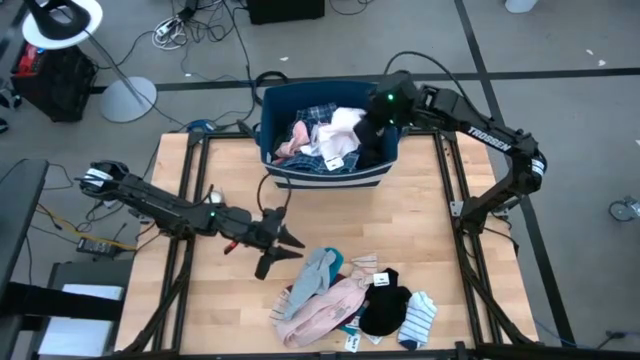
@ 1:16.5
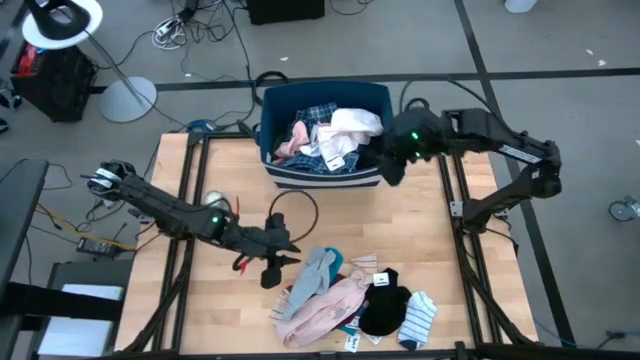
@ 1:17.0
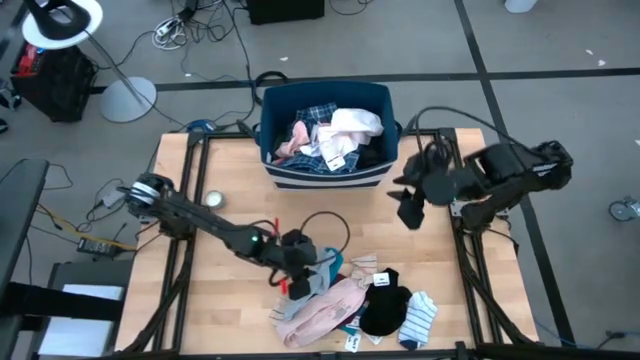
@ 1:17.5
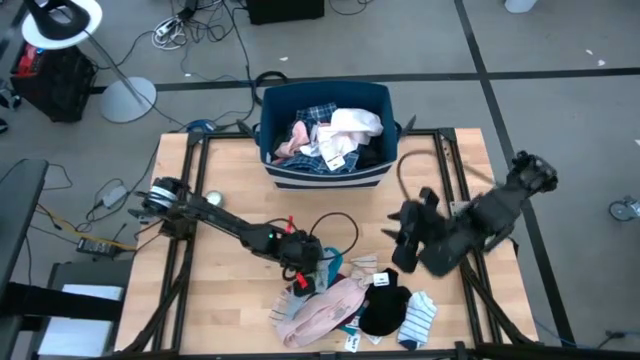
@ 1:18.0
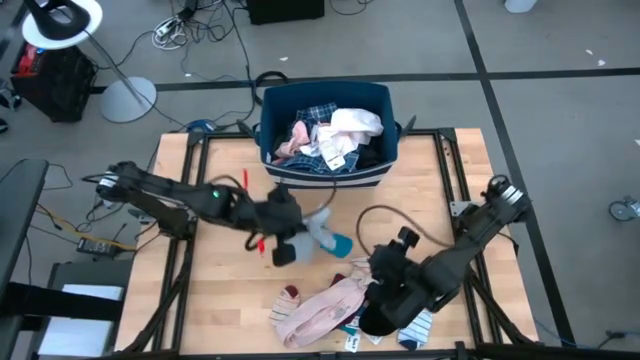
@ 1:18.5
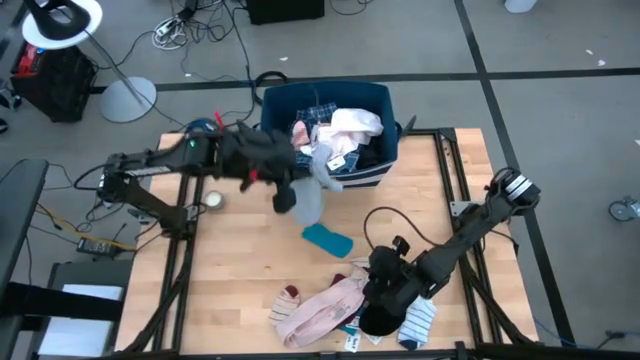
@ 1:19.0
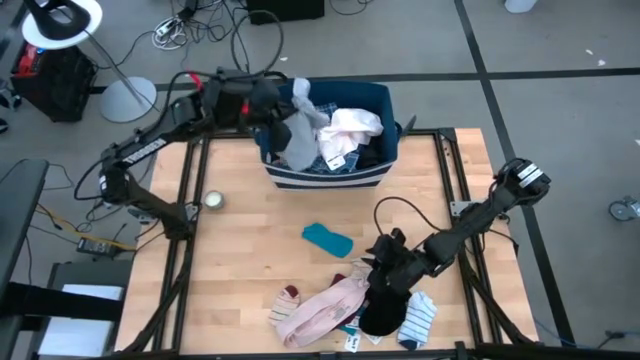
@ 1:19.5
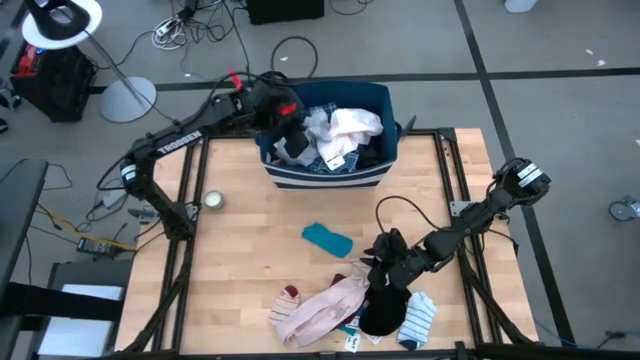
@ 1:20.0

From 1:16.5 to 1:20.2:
Task: Sort clothes
Put the gray shorts into the blue laundry organizer

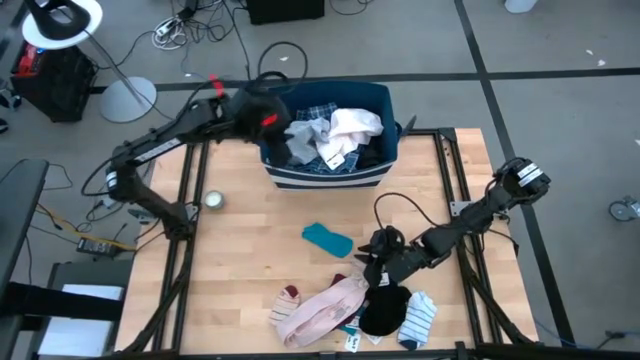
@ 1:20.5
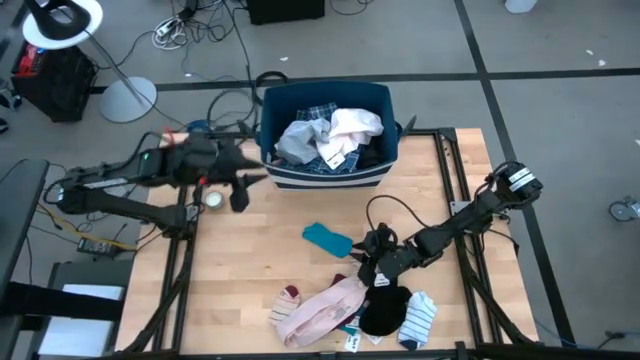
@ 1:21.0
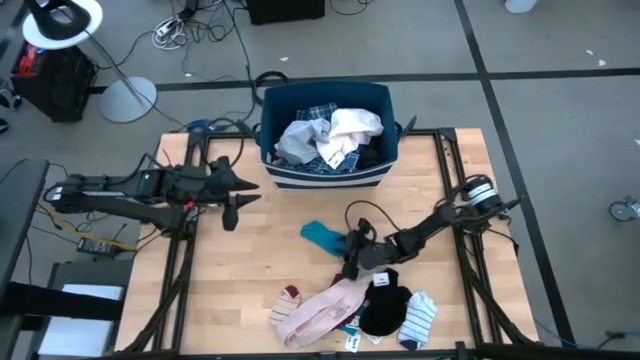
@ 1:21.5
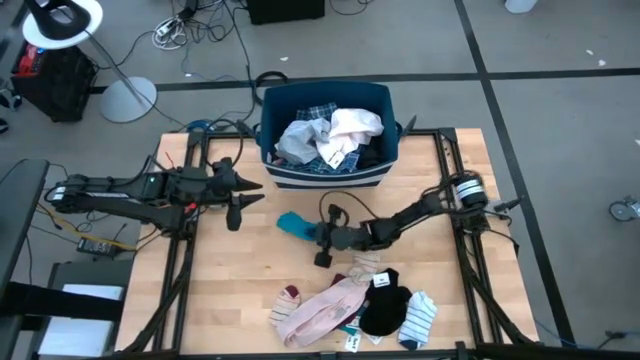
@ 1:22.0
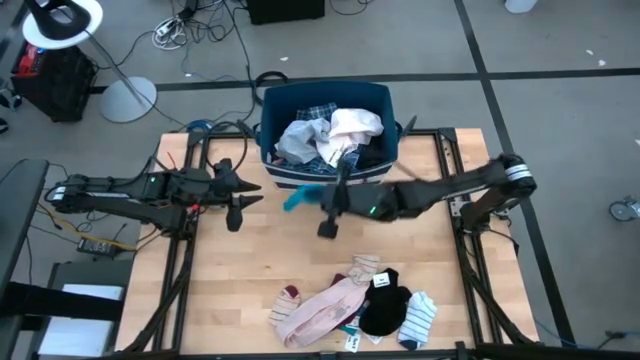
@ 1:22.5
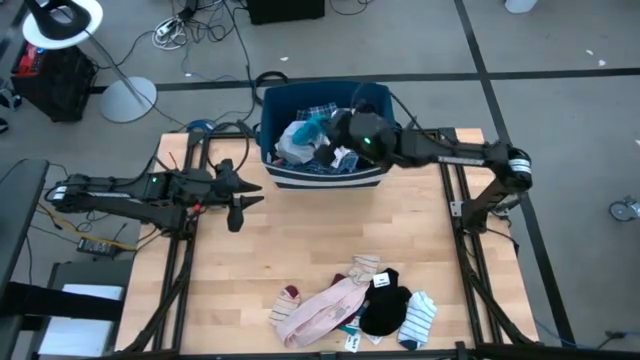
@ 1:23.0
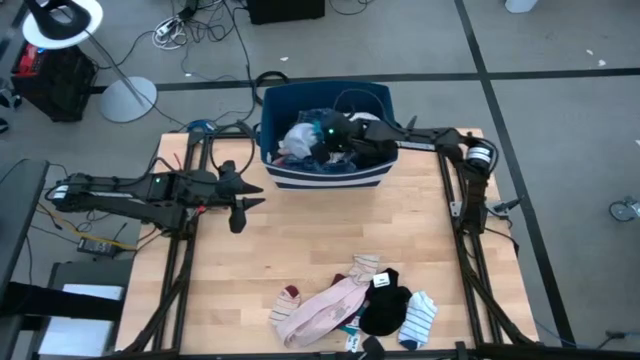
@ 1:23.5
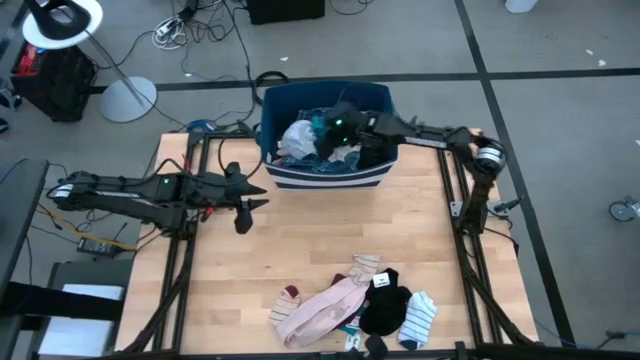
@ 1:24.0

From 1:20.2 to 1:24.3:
Put the top blue sock into the blue laundry organizer

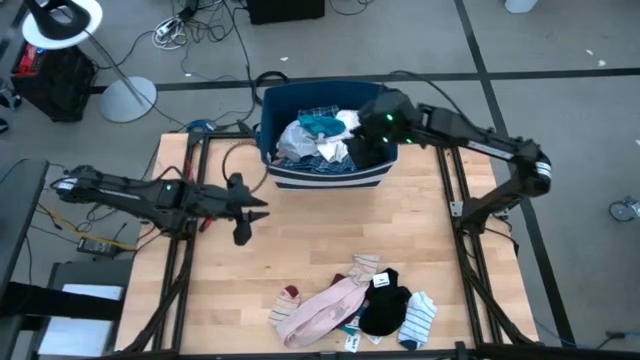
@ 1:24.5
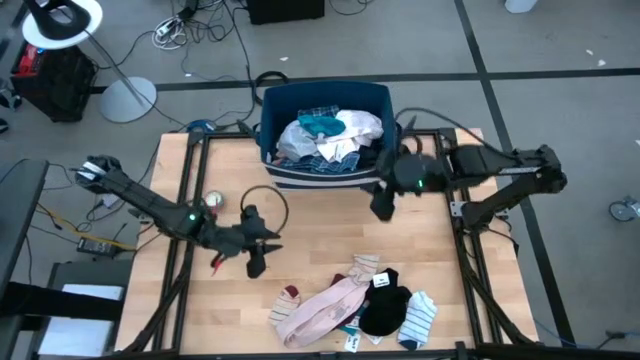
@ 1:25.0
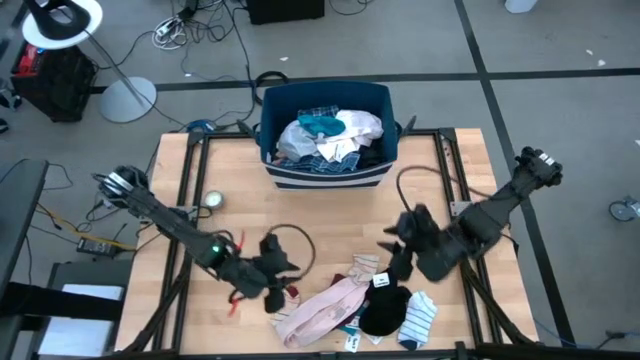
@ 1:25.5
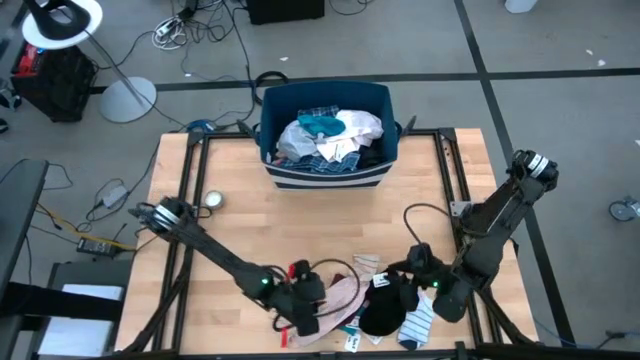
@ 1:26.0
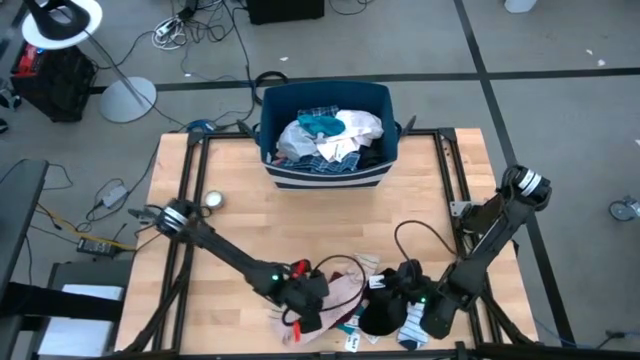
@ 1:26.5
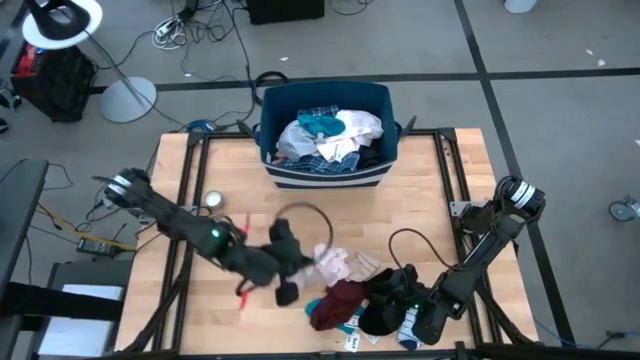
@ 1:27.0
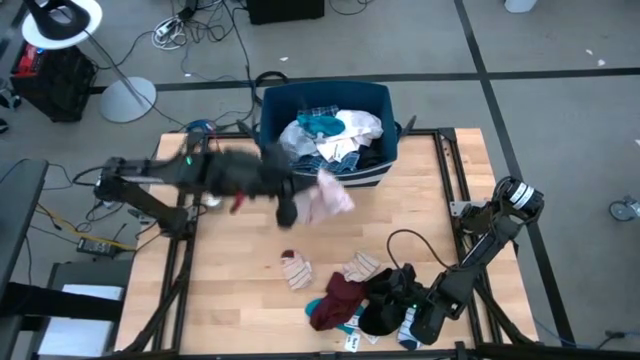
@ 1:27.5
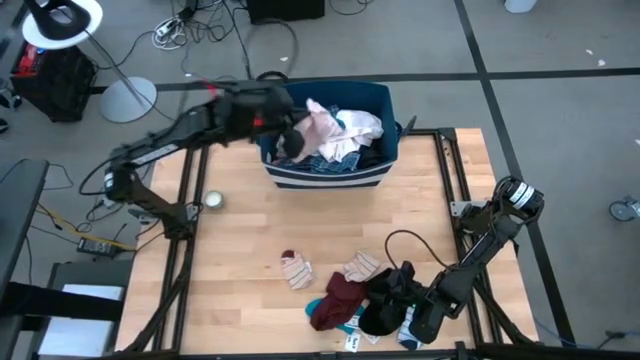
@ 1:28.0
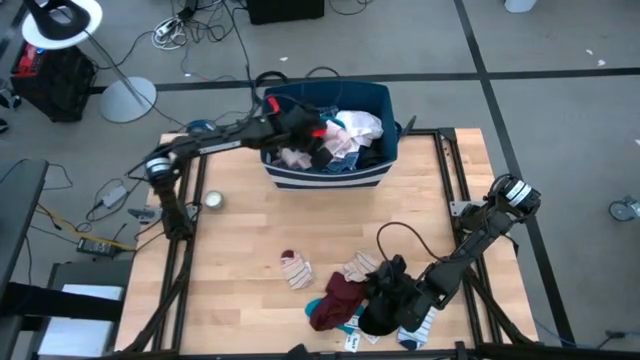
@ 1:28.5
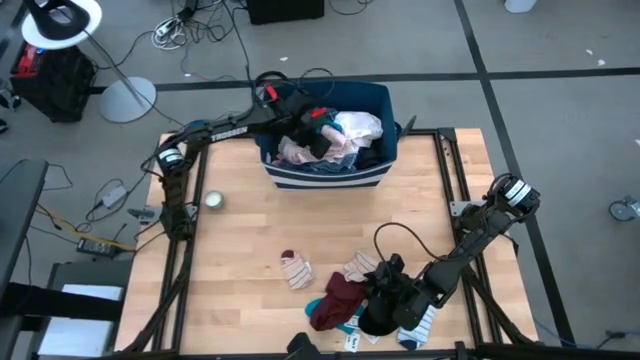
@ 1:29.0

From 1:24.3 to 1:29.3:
Put the pink boxer into the blue laundry organizer

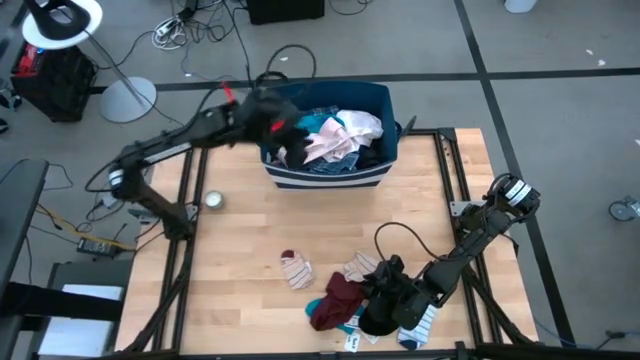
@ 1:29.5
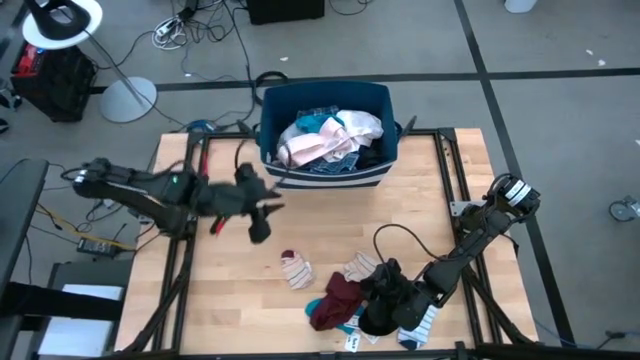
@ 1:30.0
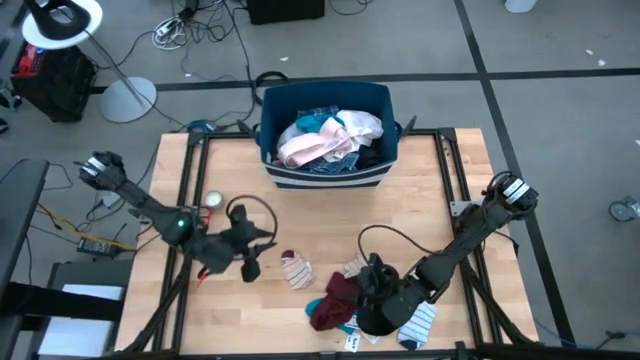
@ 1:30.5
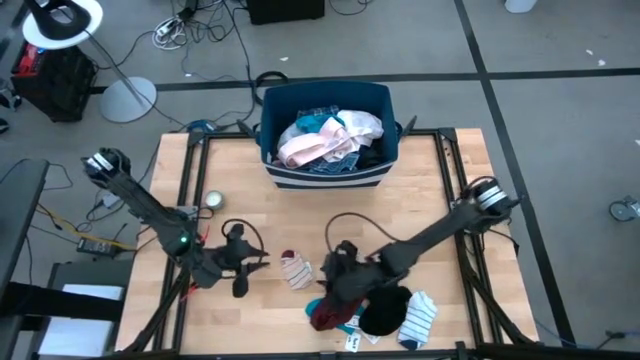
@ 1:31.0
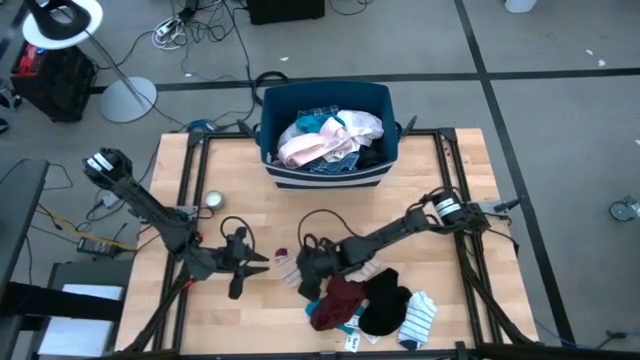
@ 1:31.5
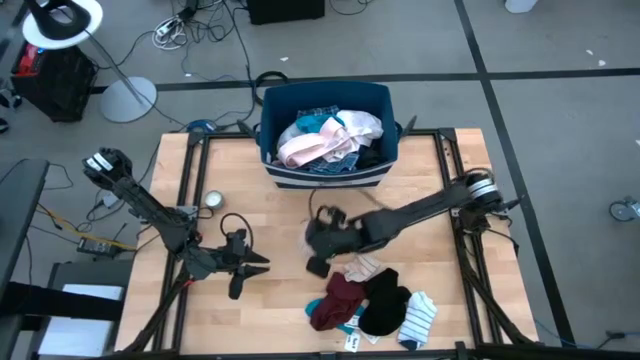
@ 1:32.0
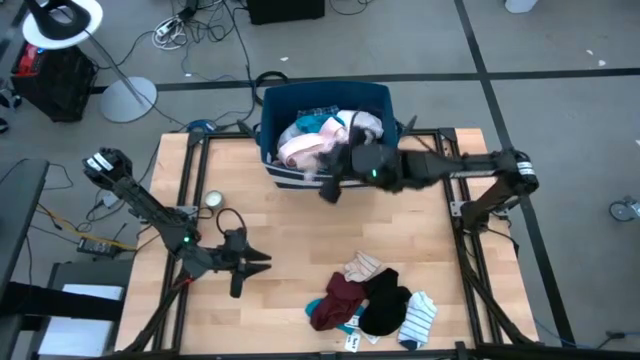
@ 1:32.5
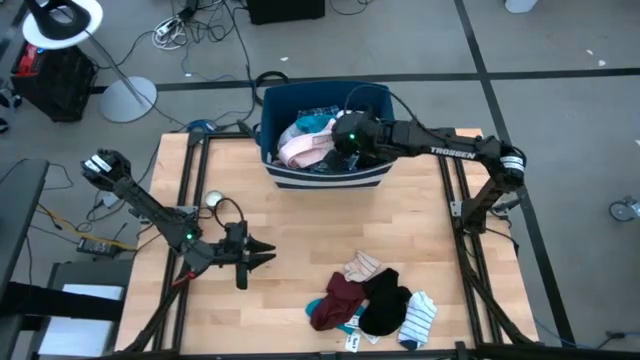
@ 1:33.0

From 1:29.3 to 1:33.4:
Put the left striped sock into the blue laundry organizer

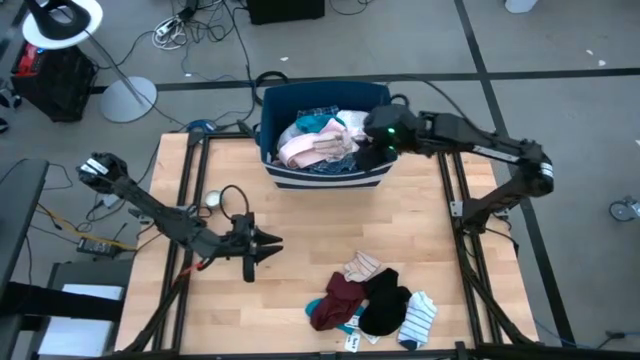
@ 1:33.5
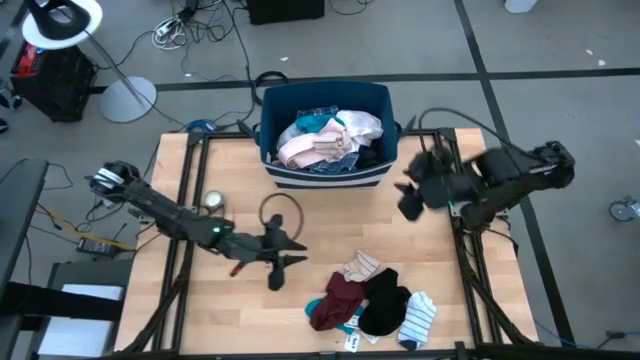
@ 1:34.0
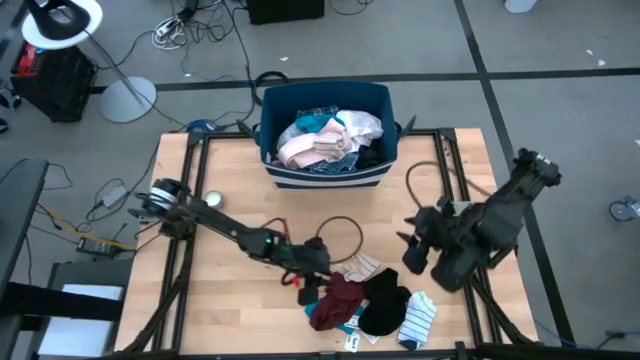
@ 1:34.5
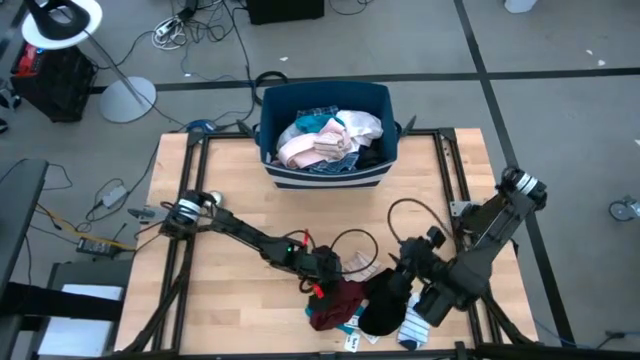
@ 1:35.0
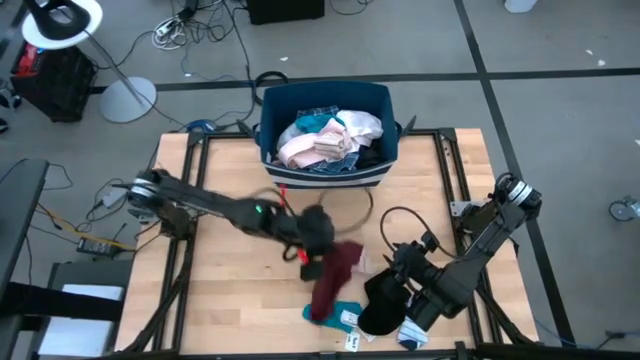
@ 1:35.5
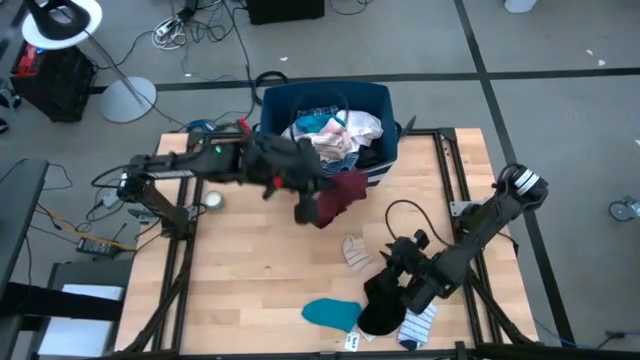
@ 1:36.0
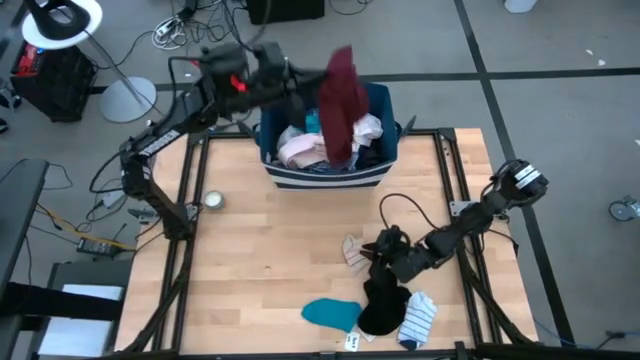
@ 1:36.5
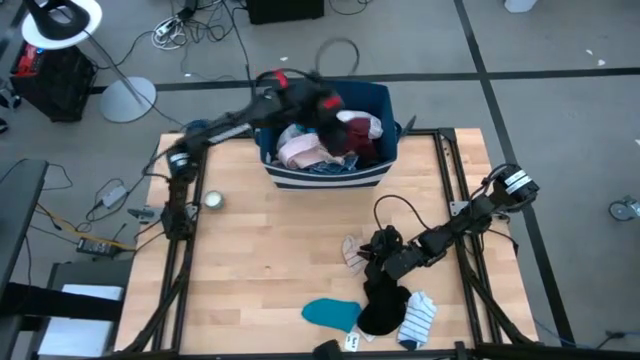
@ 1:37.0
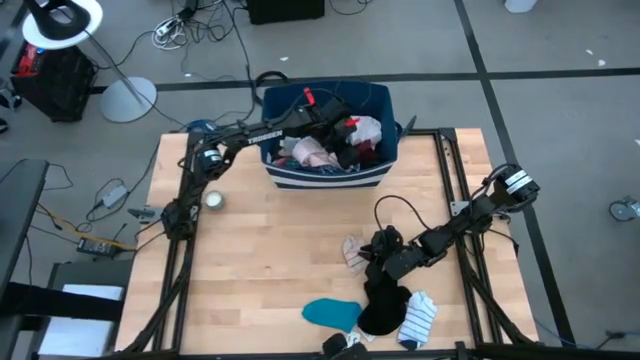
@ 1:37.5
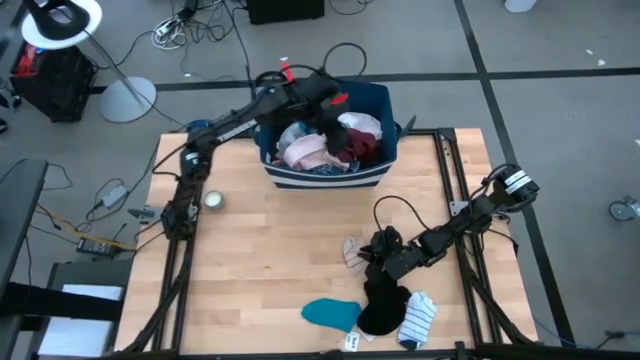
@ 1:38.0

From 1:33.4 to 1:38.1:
Put the red short into the blue laundry organizer
